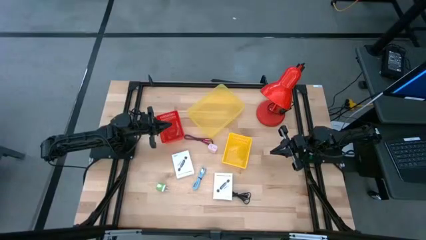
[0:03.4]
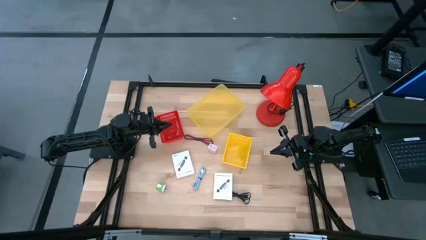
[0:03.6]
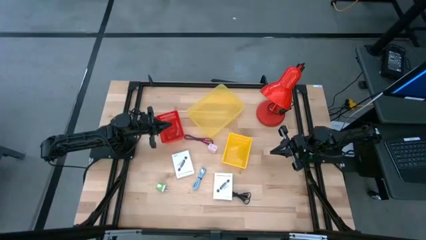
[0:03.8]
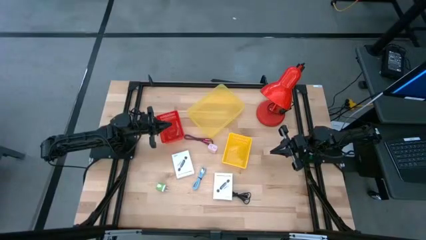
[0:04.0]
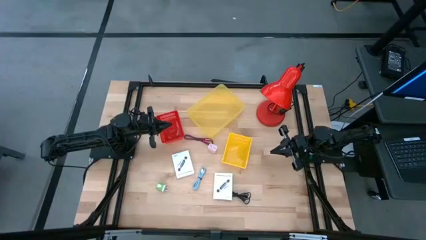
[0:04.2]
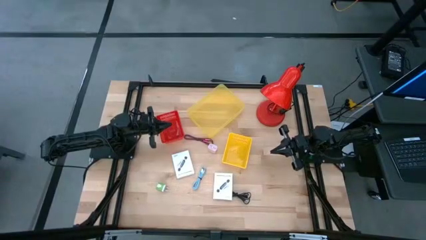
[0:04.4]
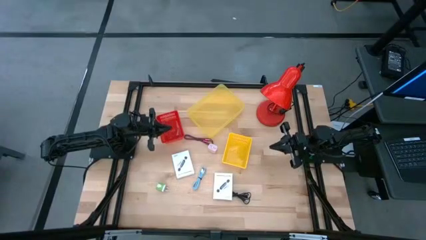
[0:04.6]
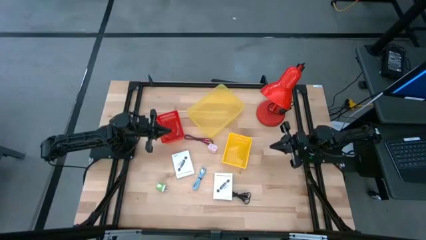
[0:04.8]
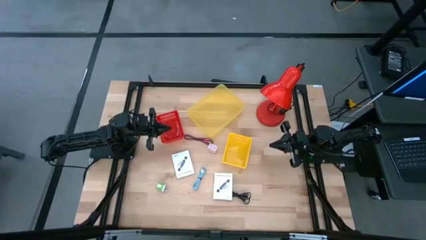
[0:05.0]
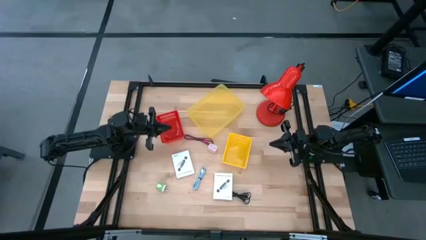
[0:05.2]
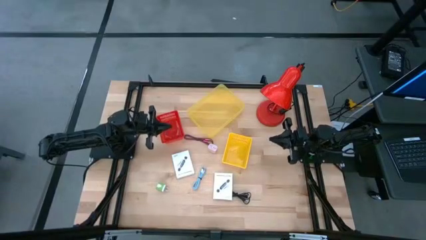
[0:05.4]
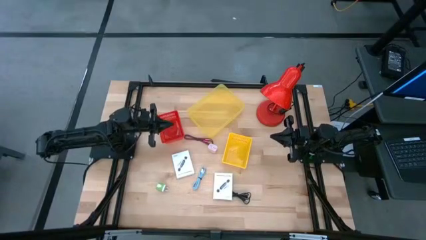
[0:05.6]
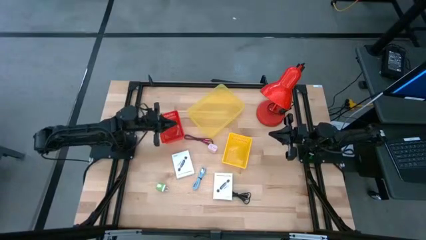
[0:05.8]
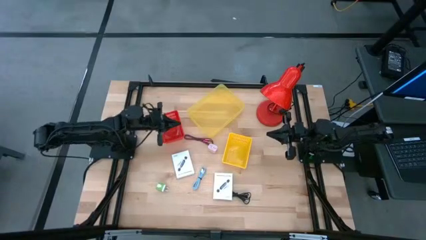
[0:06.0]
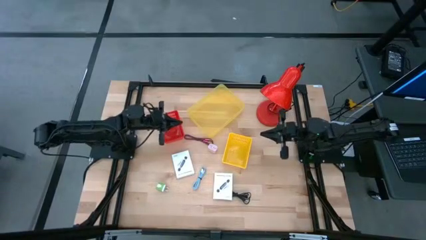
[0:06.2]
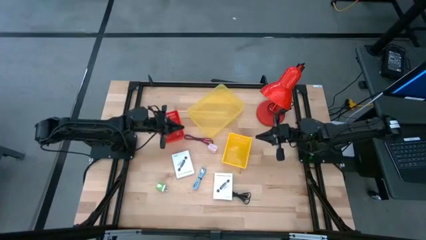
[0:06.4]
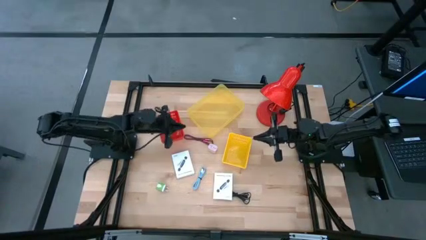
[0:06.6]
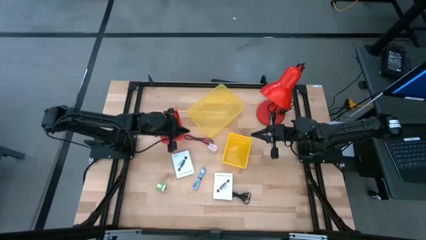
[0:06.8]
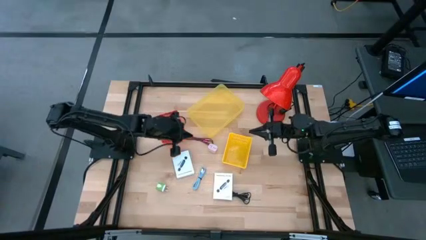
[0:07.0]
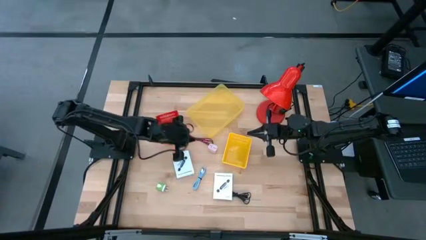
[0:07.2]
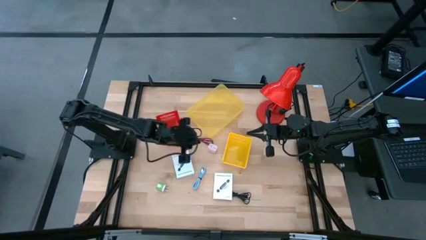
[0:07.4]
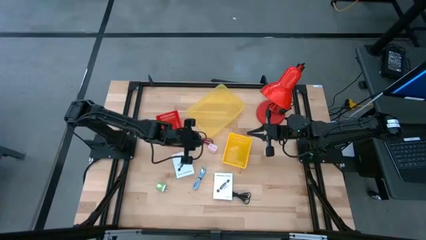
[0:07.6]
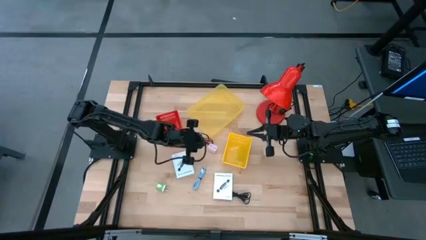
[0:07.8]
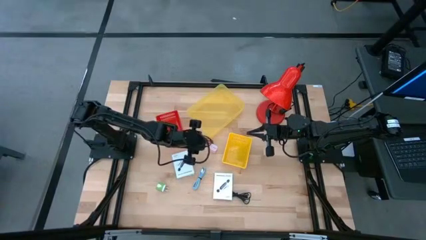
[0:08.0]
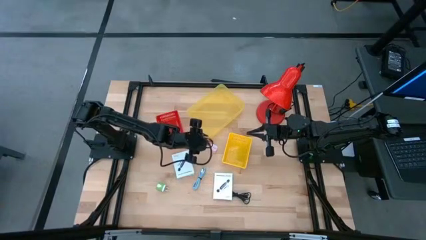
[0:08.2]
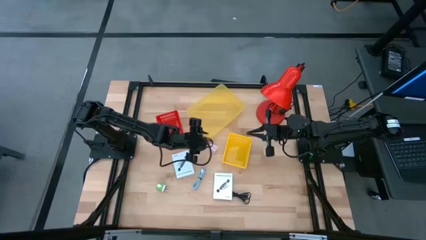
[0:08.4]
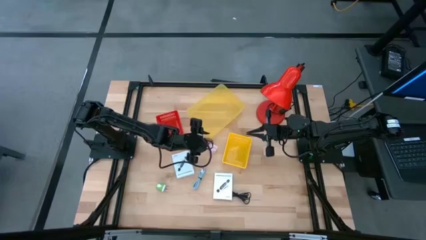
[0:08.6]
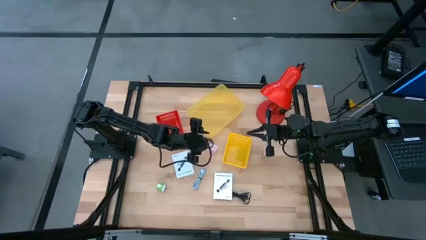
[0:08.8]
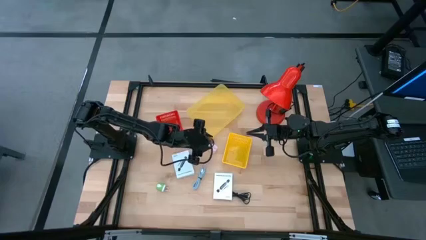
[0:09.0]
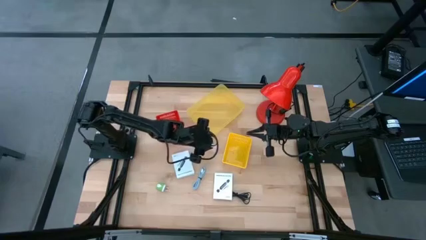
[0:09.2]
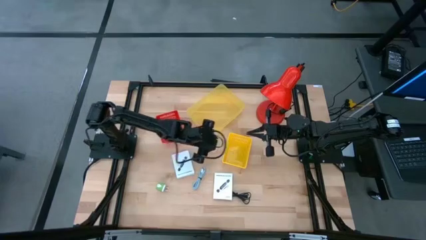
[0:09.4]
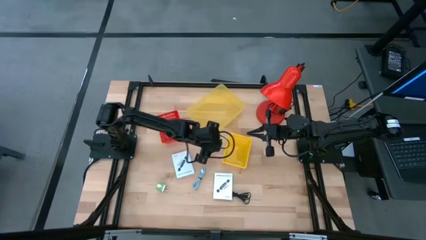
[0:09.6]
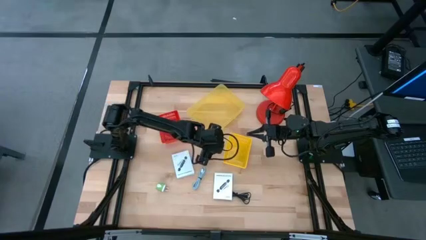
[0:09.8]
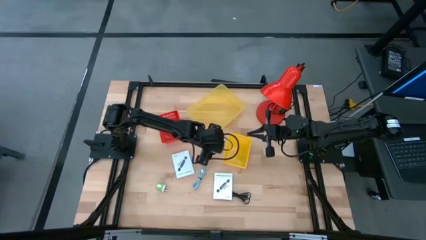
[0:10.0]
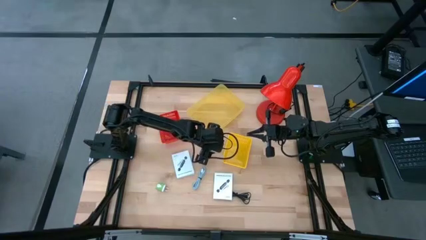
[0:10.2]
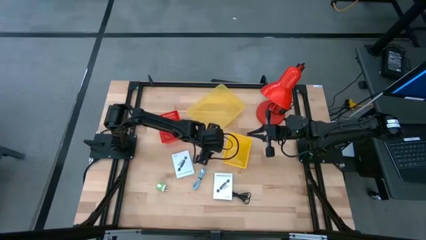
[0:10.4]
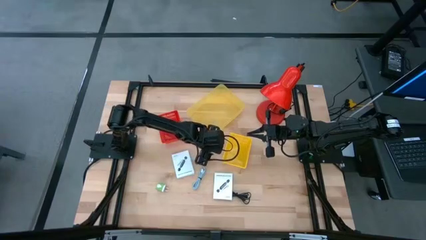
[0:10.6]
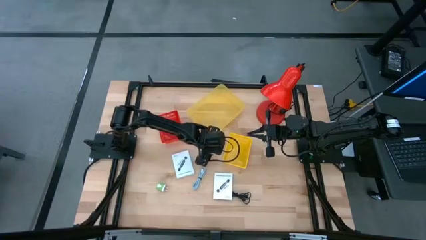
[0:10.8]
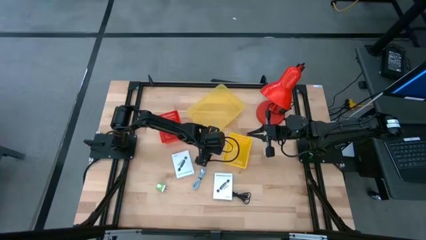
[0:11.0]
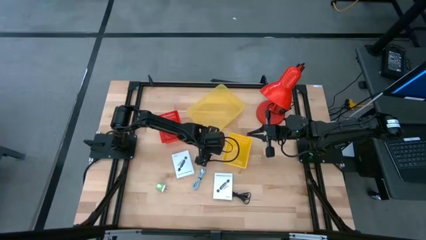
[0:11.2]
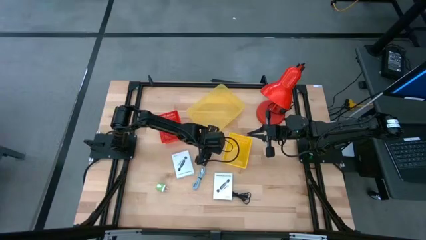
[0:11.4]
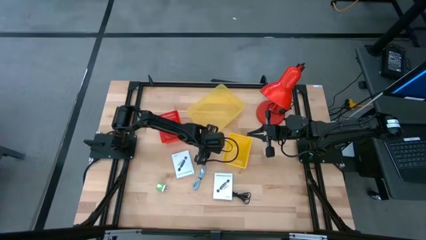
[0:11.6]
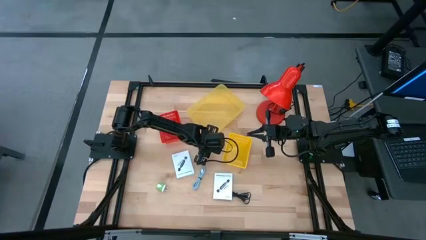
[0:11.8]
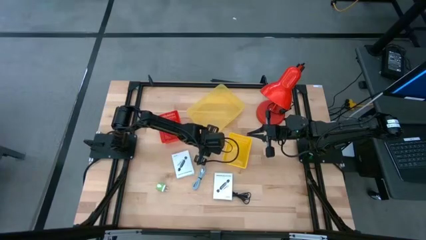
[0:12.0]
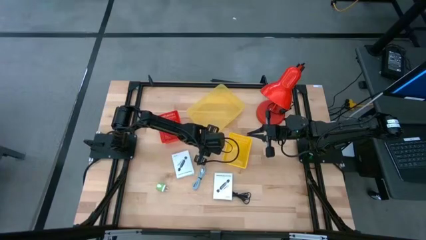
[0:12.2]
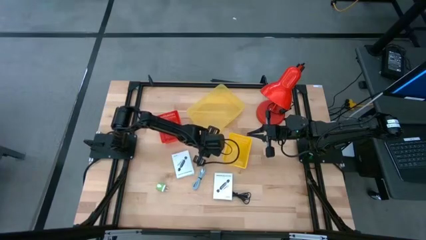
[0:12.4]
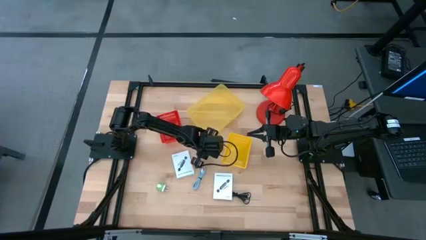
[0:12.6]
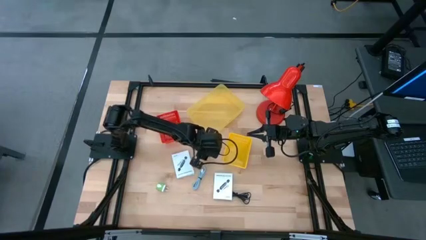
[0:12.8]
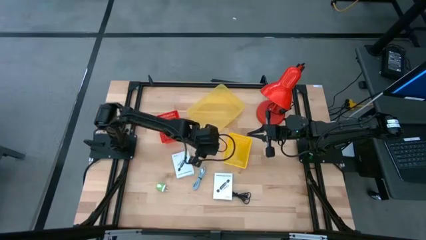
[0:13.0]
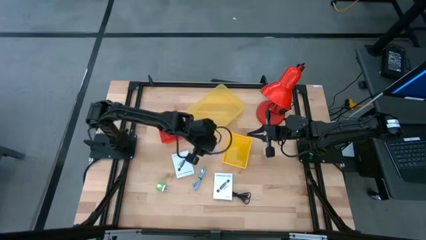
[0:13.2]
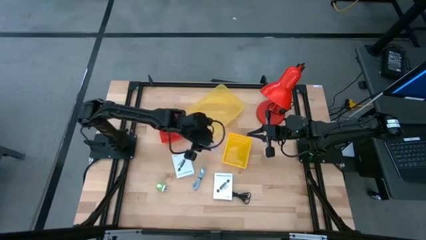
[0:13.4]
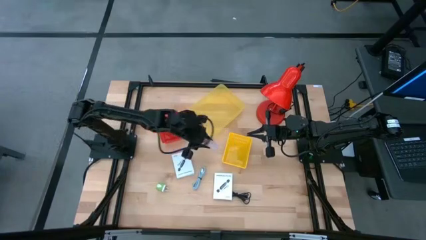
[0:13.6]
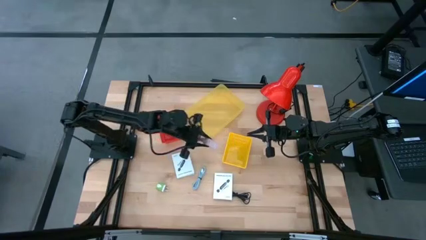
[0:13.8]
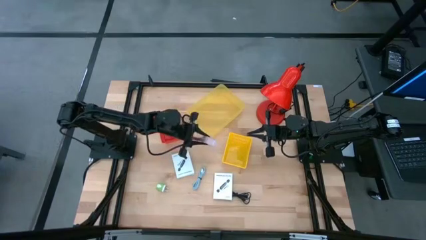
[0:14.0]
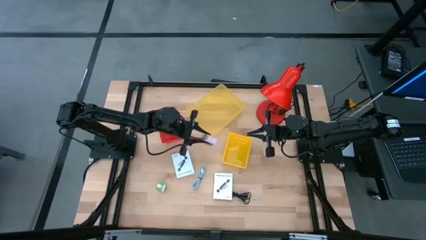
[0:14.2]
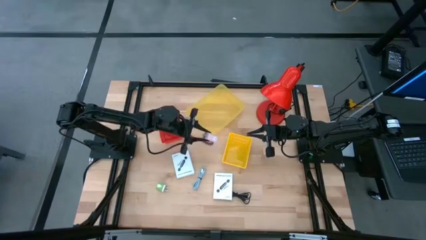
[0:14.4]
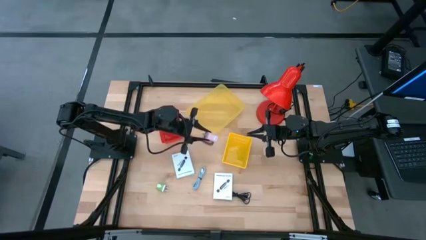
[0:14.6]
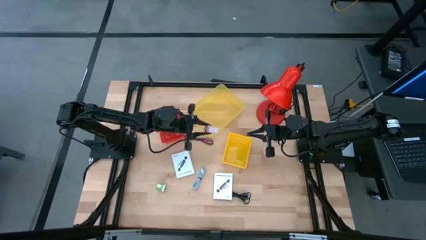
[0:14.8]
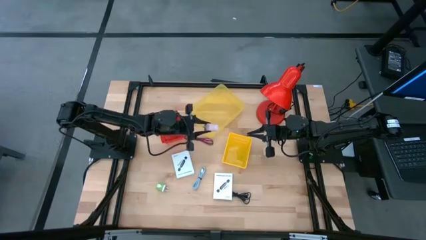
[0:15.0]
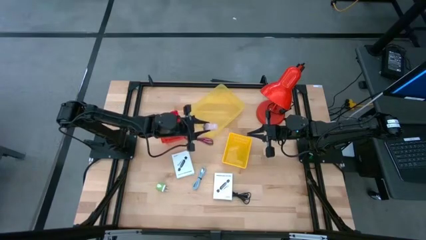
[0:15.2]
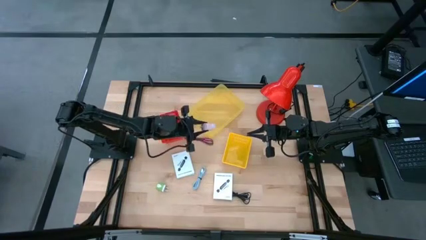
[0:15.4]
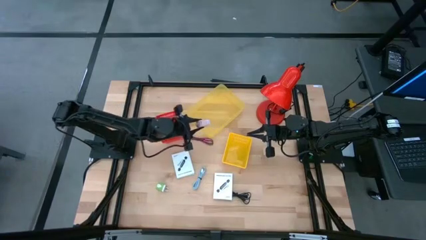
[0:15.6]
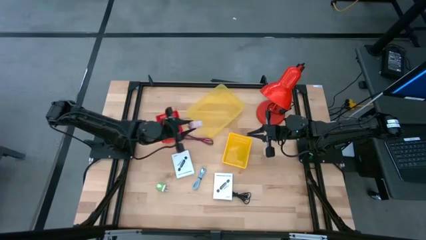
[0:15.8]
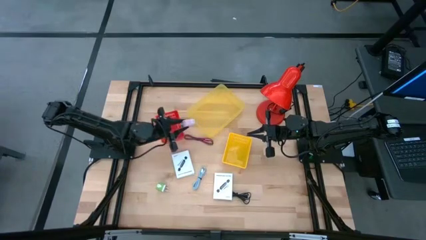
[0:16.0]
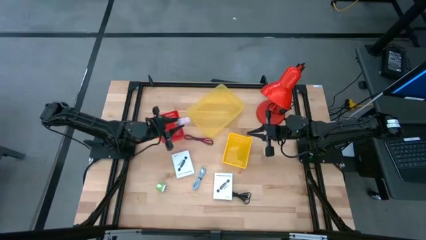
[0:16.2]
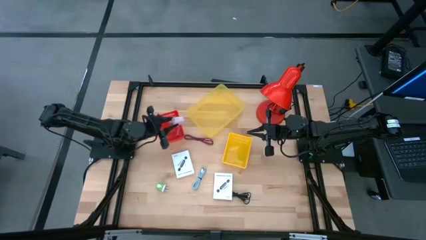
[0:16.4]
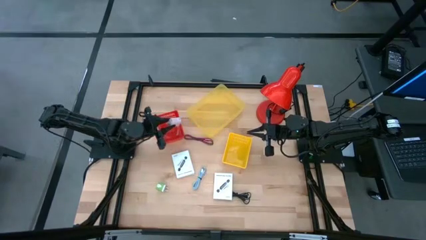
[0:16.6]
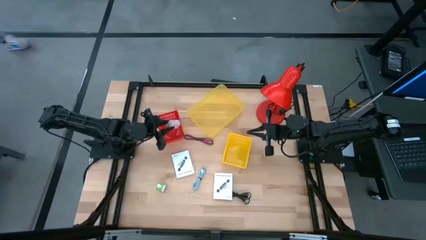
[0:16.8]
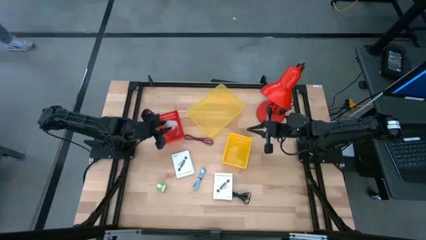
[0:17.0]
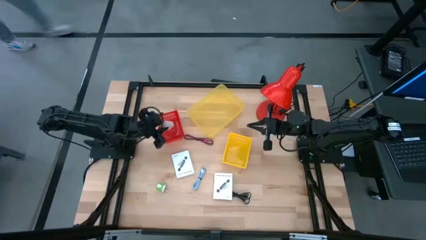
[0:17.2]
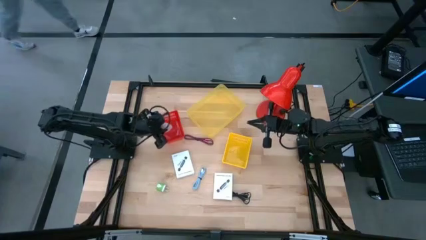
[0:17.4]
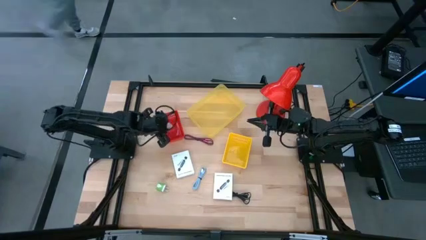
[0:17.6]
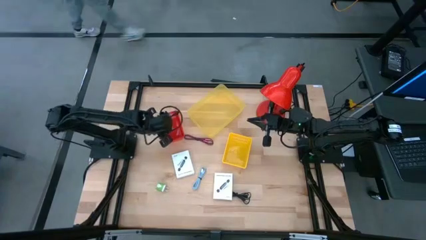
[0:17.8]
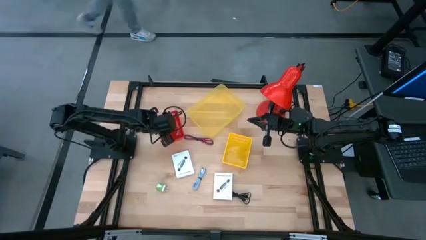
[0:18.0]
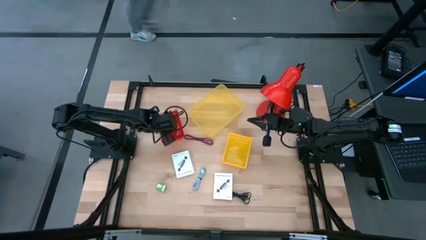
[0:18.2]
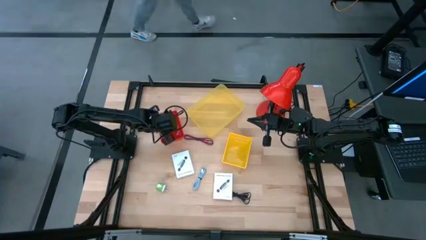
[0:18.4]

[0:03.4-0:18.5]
Task: Pick and place items into bin
Put the pink charger adapter into the red bin
